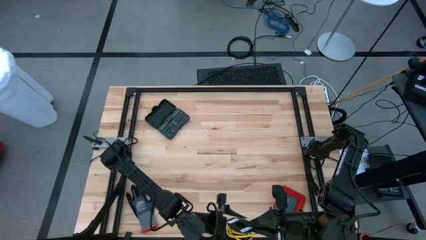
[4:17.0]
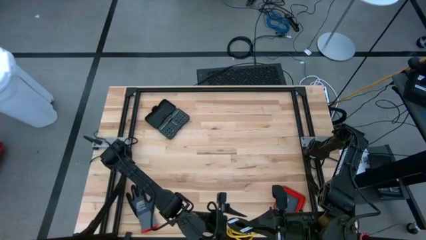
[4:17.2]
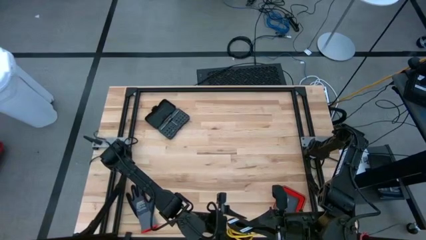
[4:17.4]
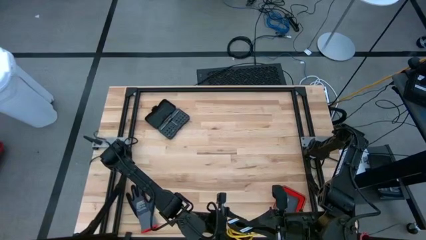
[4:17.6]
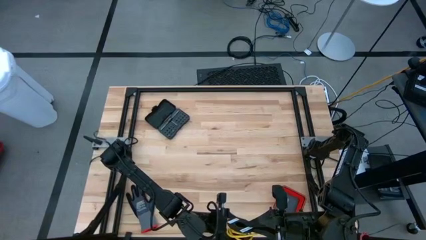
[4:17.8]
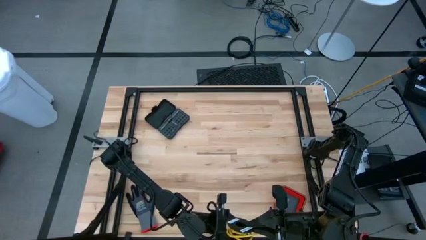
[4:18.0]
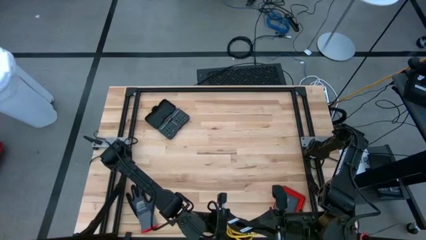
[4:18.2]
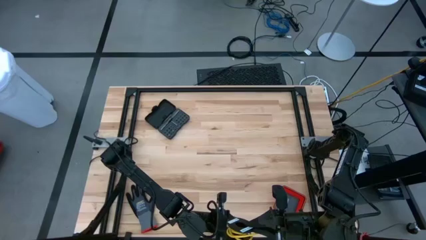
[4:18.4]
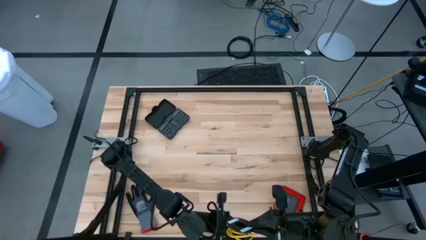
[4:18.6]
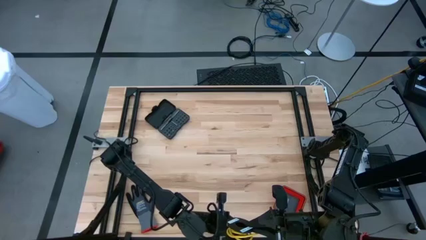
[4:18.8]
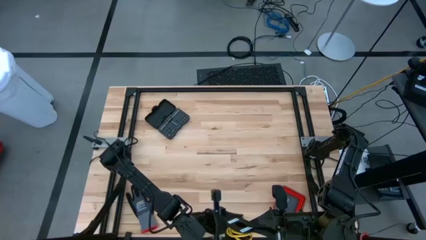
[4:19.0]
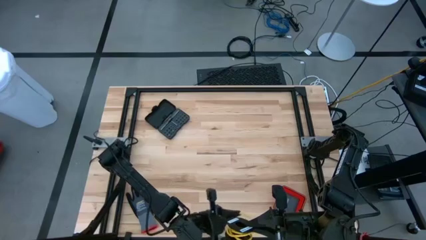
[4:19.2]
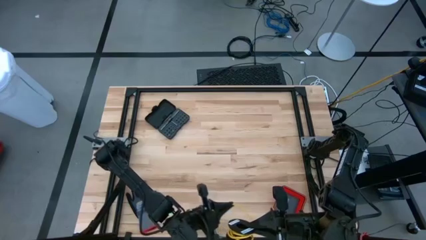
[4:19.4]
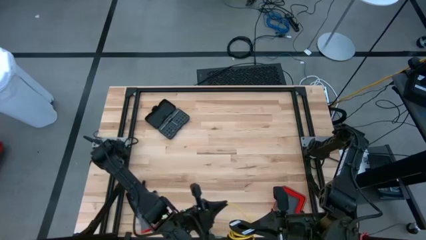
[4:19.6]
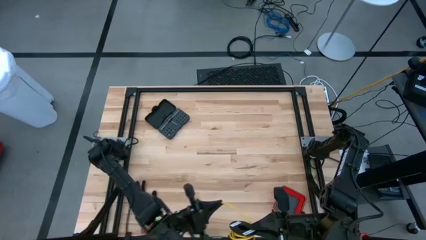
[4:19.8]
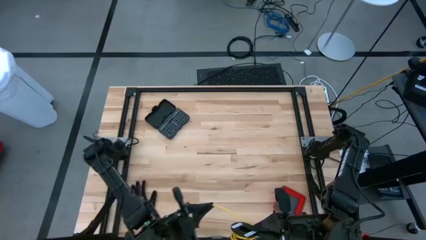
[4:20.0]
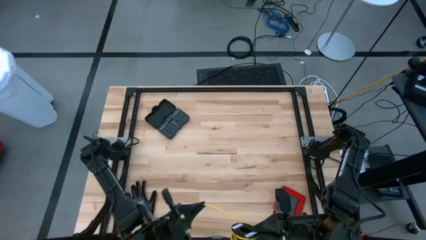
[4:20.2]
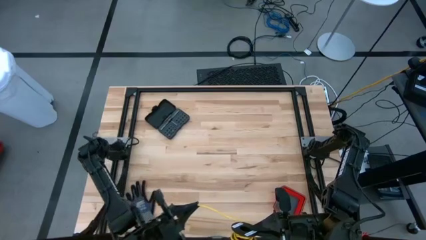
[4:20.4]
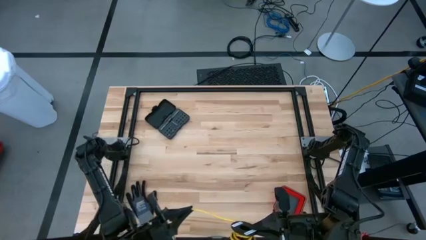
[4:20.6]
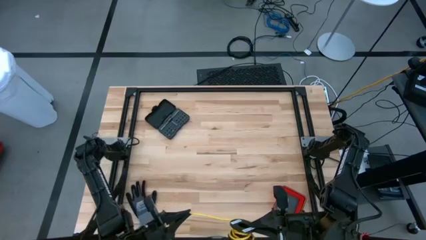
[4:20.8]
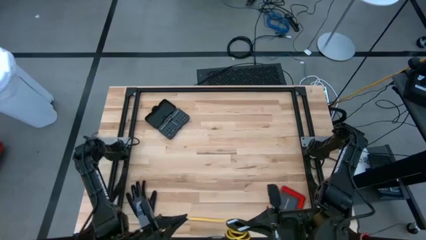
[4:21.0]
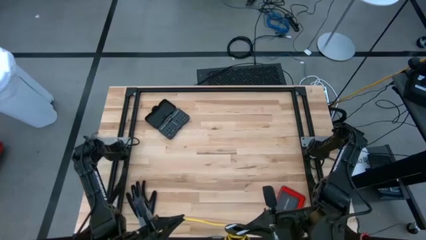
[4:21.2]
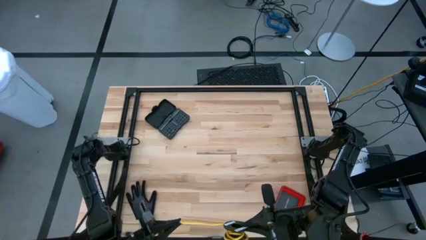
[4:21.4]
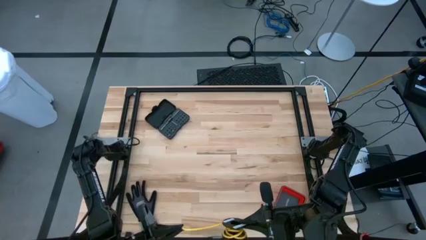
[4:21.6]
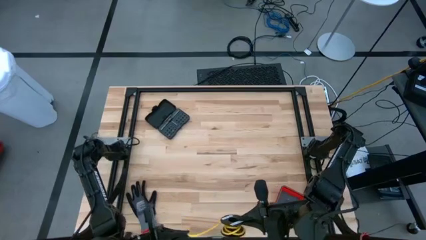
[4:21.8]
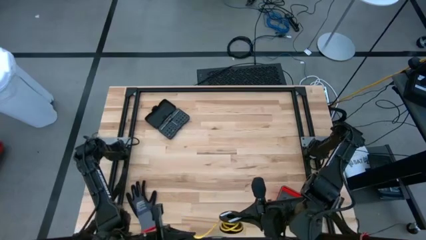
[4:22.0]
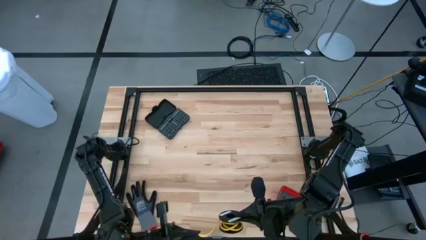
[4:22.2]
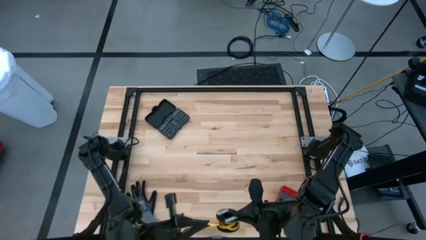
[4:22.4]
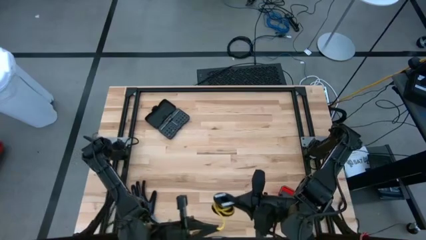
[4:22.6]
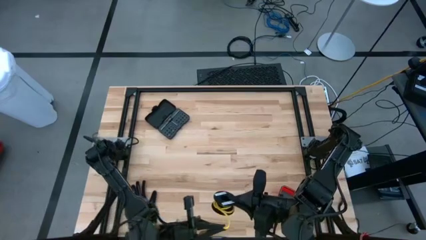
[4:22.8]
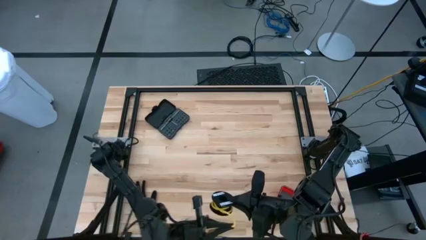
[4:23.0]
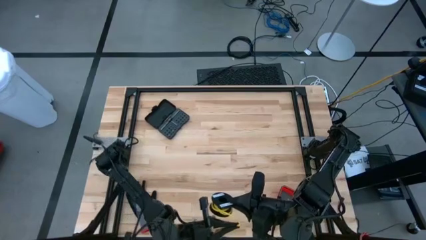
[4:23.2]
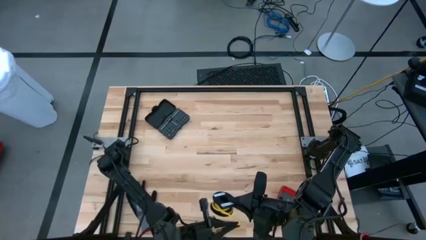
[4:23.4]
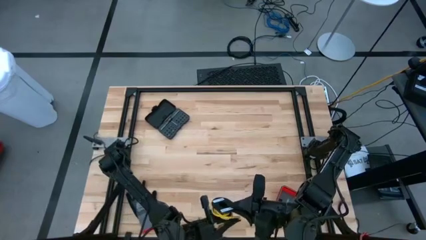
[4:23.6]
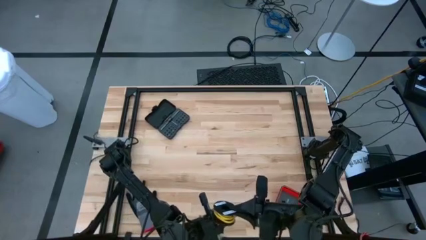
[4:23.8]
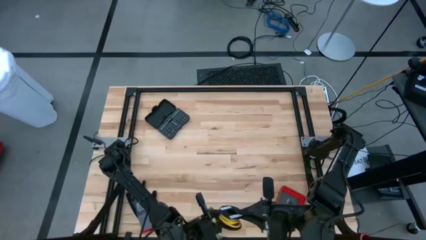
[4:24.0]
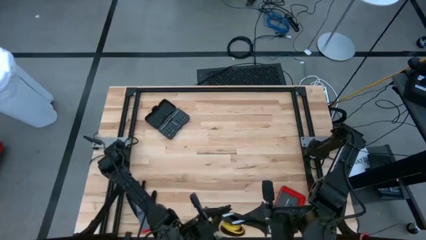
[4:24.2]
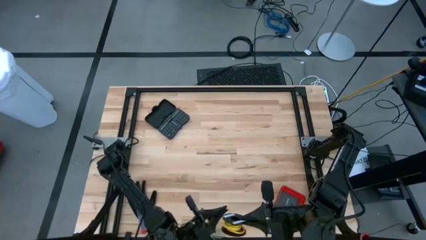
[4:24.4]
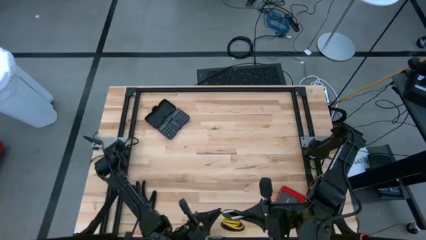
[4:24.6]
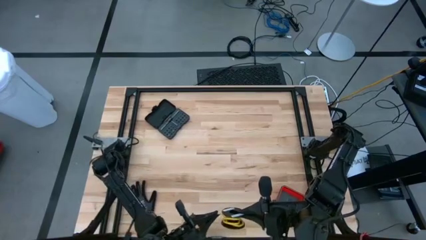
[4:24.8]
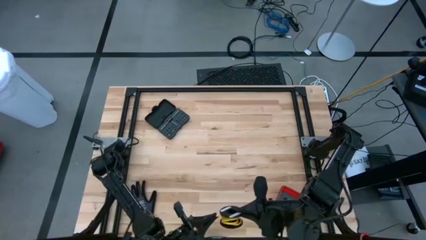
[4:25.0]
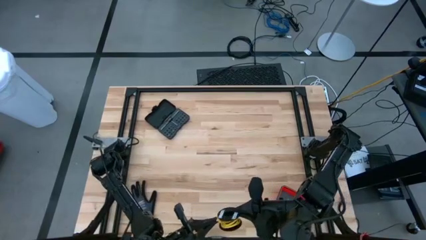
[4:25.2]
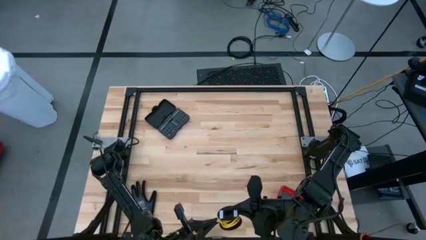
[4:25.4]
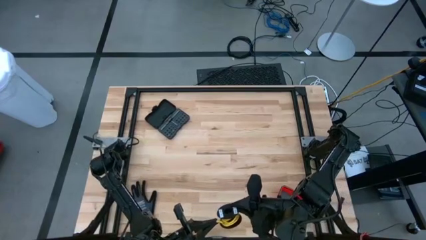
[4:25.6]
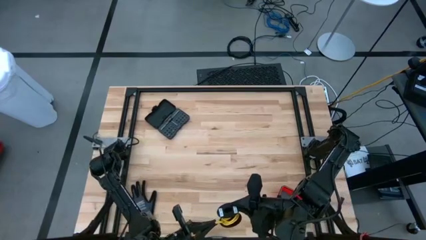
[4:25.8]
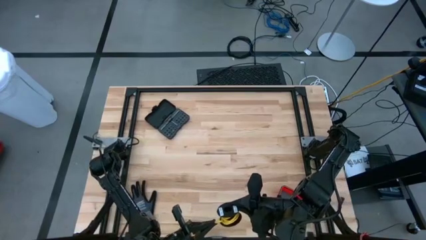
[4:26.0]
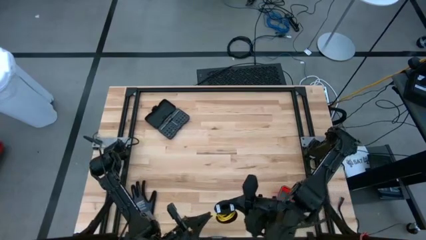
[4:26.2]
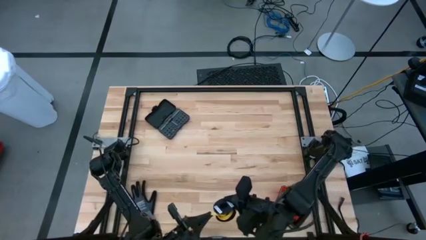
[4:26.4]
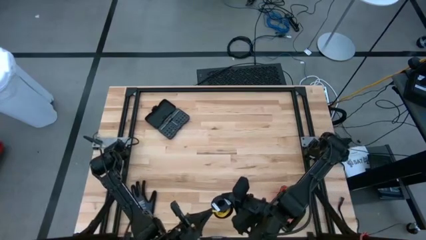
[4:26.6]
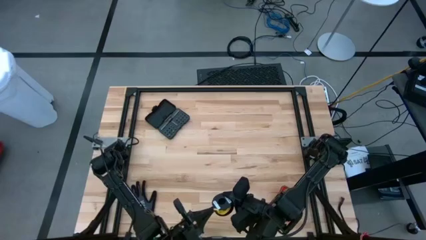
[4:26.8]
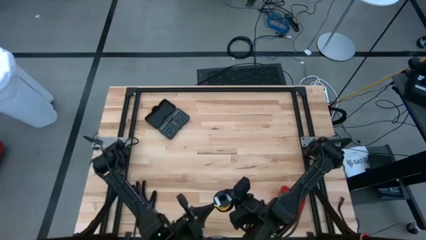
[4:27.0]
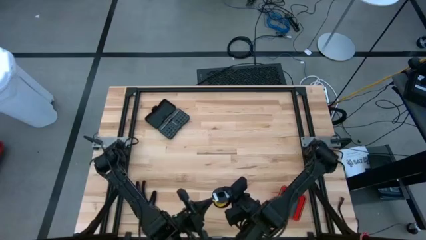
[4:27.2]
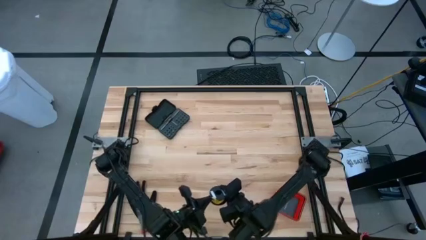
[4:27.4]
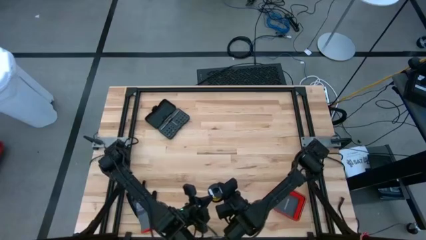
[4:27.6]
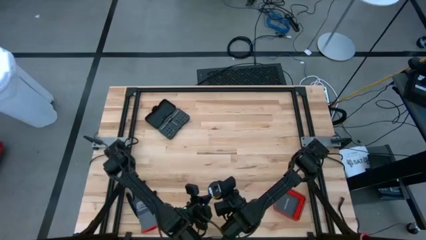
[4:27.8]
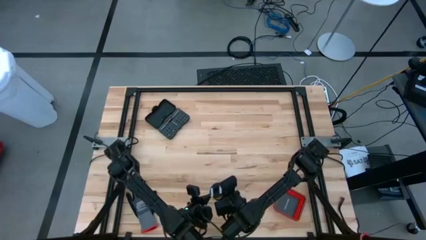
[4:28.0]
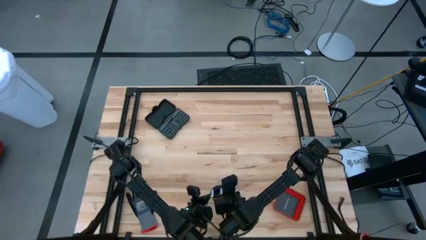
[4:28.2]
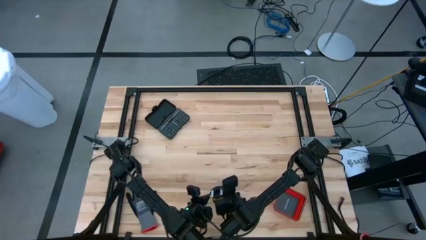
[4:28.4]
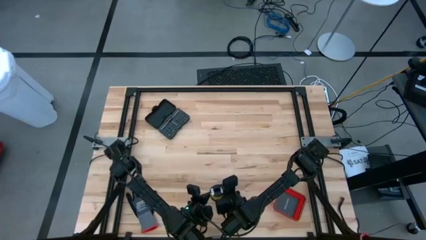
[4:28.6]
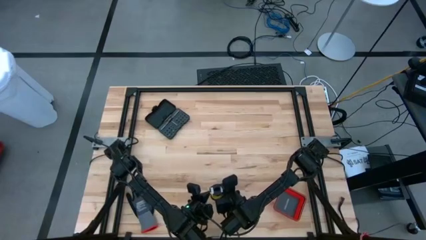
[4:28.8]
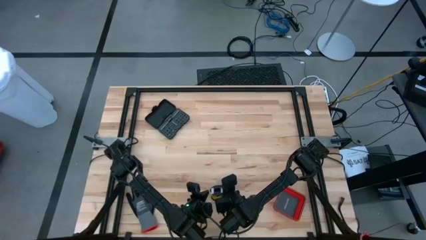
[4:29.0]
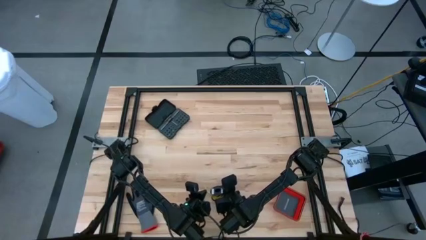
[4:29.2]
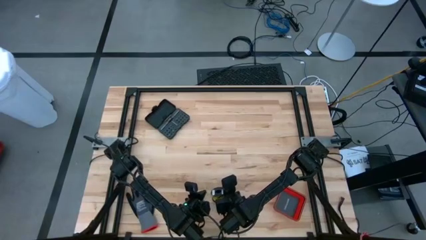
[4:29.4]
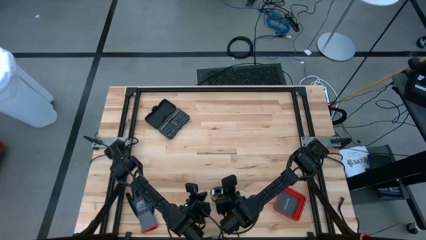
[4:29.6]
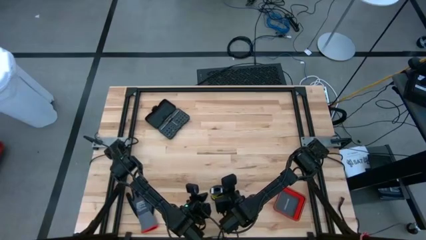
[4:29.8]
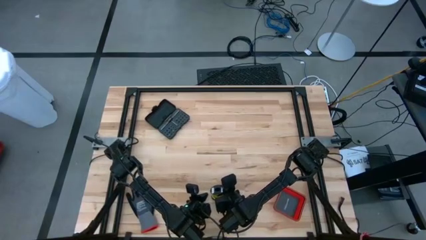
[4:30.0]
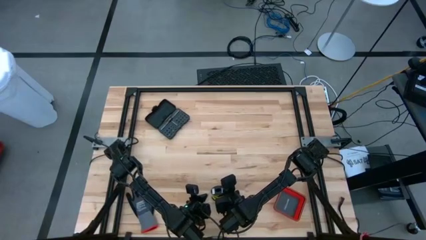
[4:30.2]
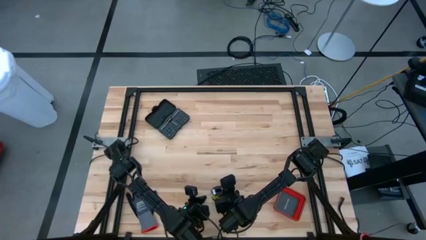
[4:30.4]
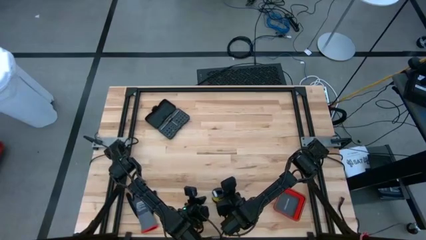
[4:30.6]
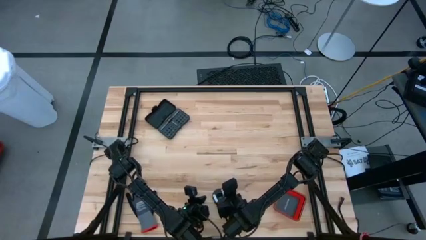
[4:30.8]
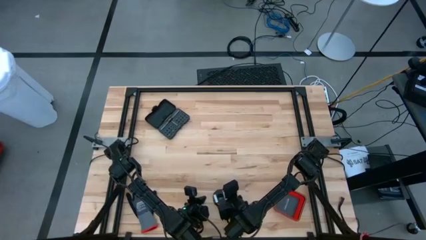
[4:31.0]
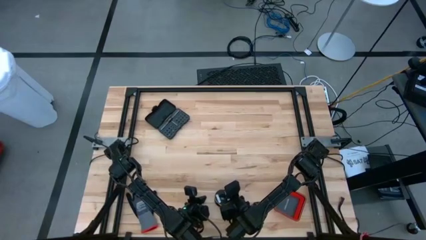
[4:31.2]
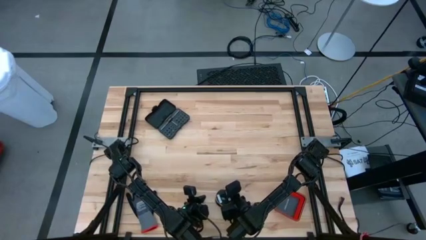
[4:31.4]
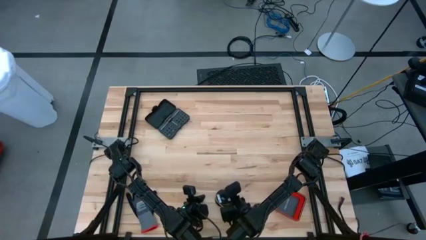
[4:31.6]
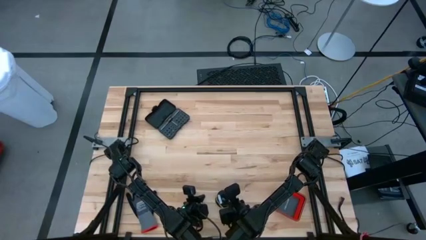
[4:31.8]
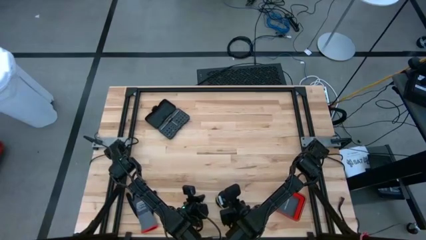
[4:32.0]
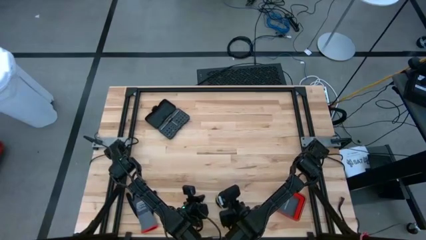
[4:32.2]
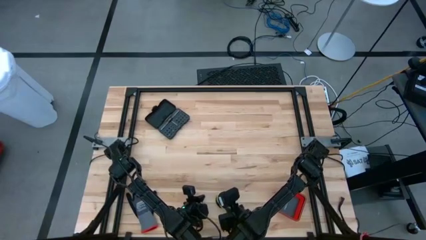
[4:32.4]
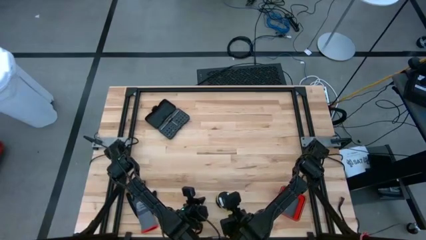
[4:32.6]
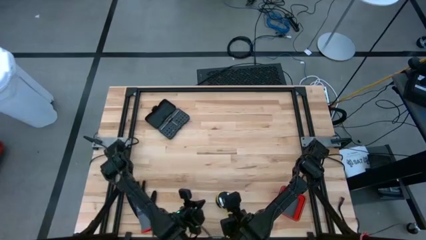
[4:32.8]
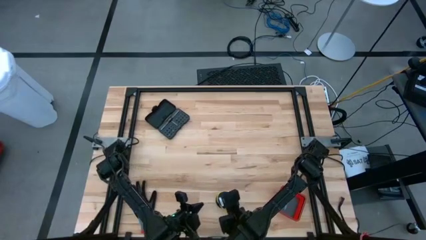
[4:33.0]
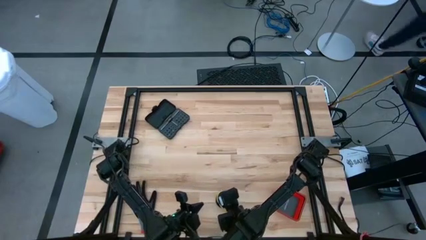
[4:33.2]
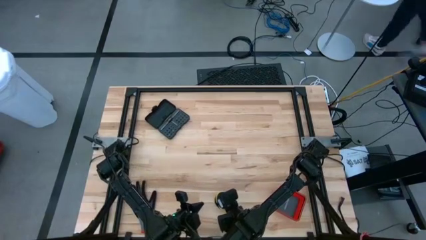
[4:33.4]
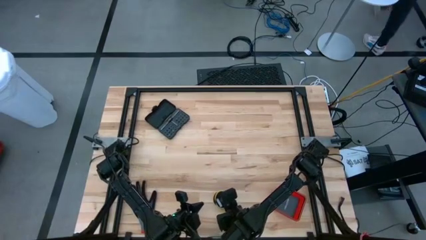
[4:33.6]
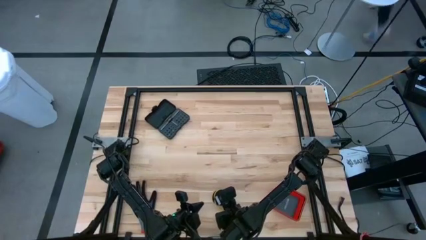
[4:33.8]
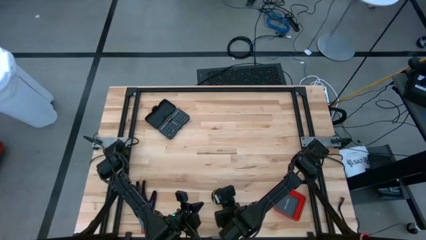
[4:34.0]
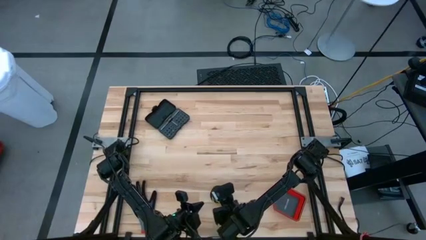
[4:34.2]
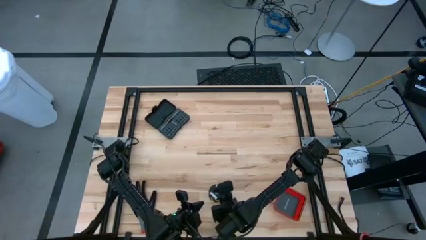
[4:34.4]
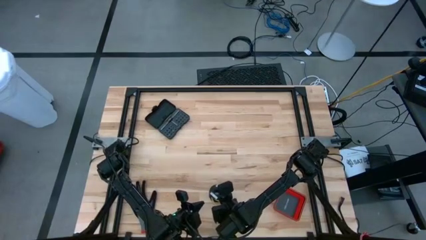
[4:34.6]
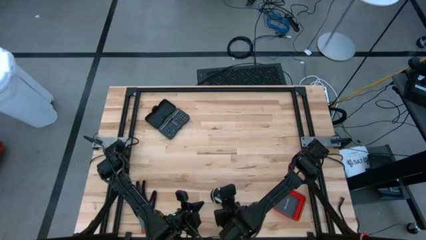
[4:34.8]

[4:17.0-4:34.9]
Task: Coil cords
Coil the yellow wire onto the spool
